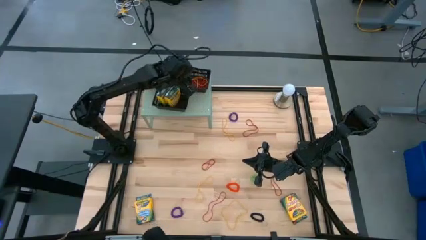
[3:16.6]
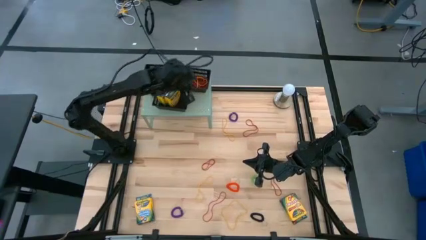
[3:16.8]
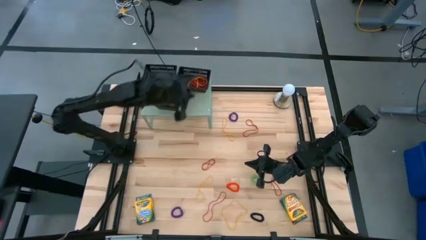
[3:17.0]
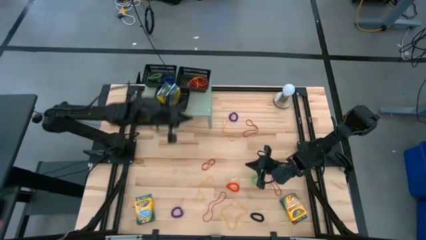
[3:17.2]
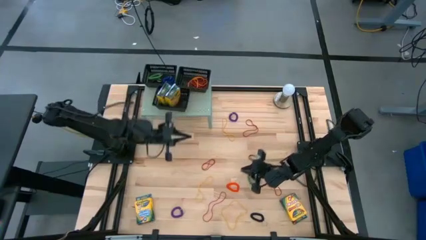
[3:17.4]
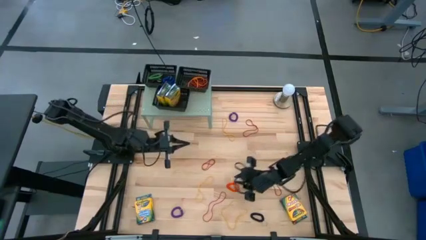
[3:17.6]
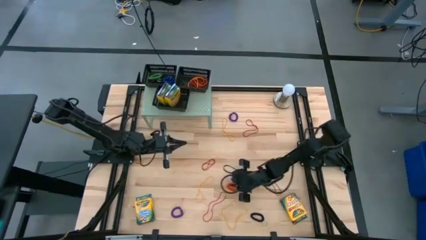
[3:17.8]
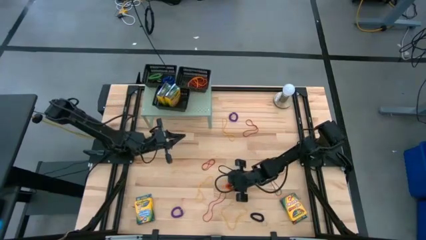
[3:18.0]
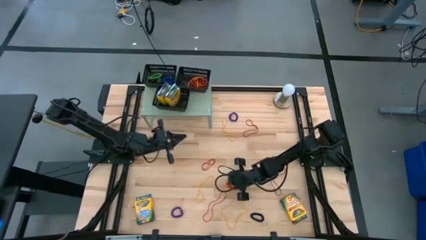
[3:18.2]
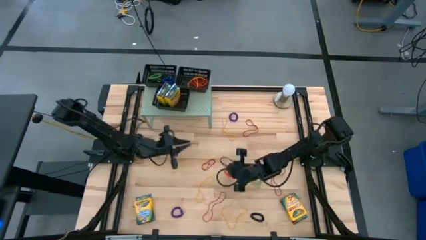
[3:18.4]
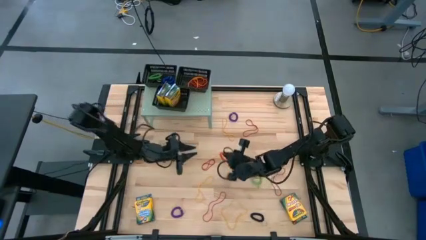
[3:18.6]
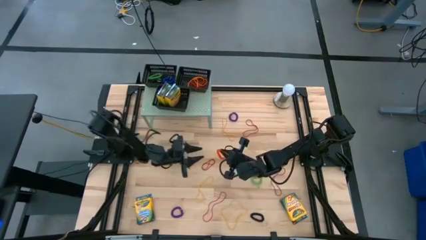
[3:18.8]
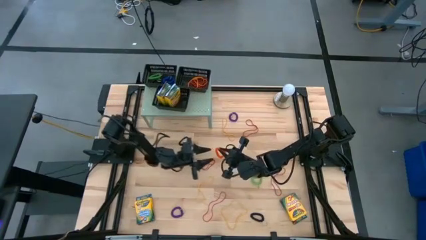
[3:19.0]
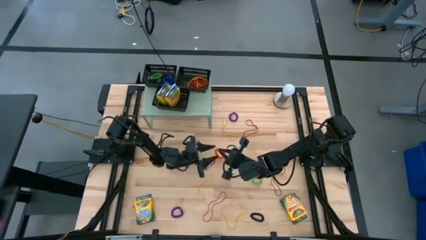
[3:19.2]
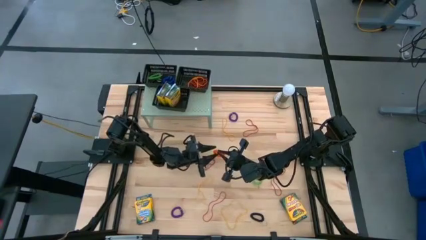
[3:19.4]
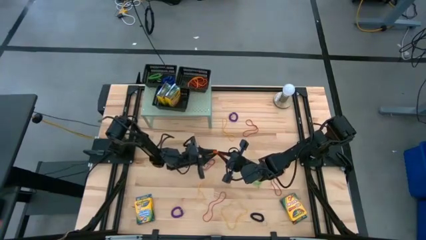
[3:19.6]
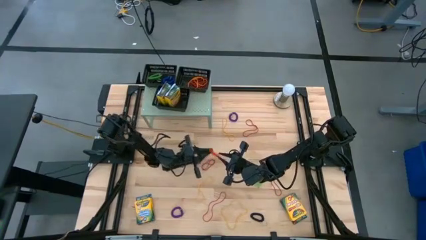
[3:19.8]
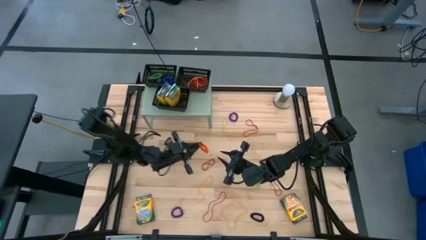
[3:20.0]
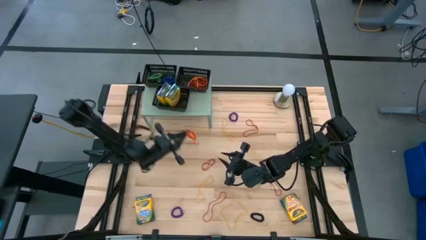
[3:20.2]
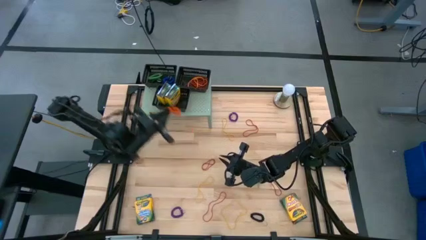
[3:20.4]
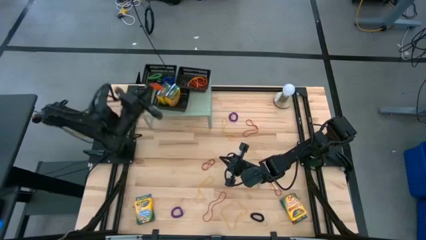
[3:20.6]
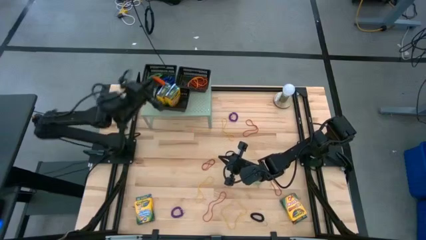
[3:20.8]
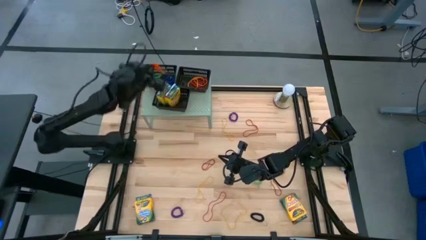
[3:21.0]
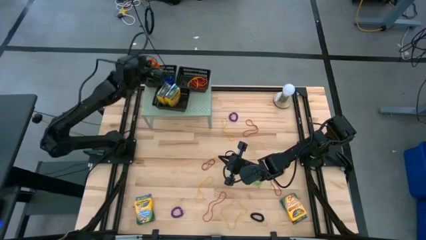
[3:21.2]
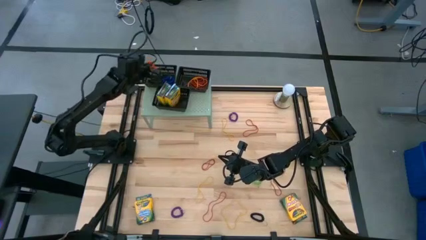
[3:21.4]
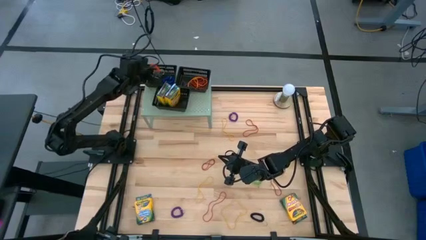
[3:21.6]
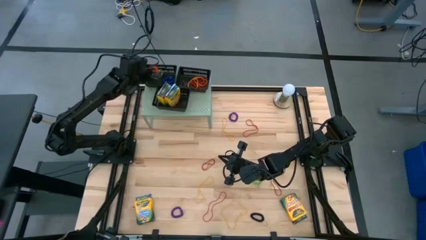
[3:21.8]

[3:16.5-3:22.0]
Task: Pick & Place Office Desk Supplies
Put the orange spring rubberband into the top left black bin

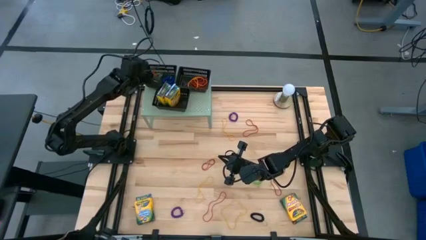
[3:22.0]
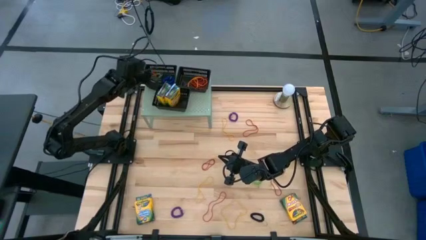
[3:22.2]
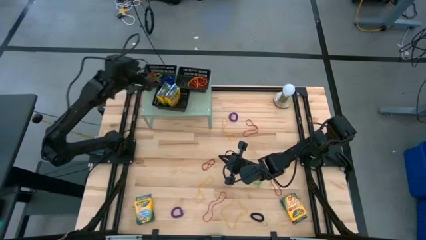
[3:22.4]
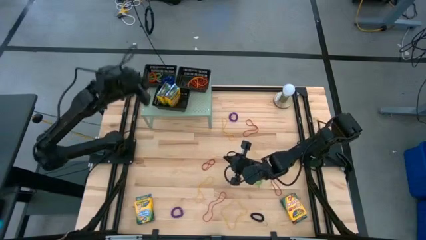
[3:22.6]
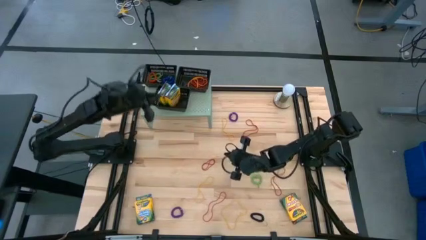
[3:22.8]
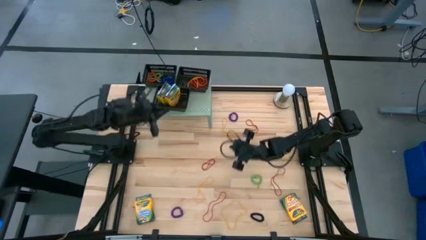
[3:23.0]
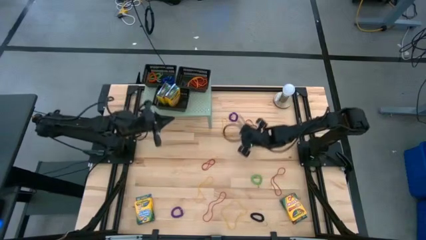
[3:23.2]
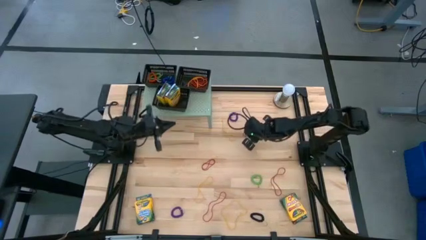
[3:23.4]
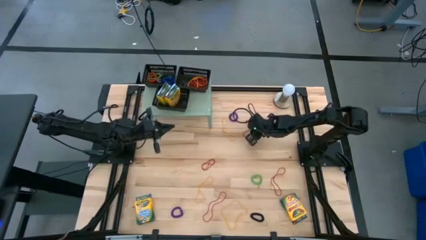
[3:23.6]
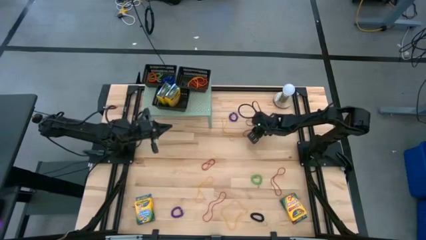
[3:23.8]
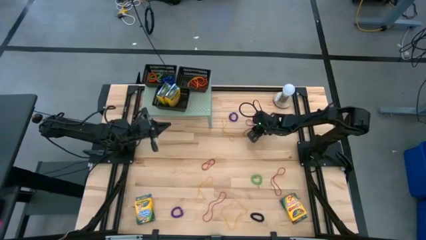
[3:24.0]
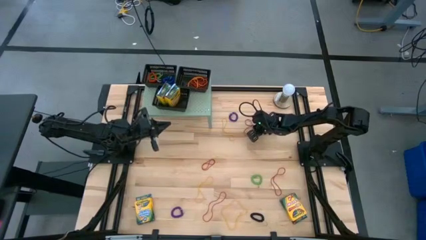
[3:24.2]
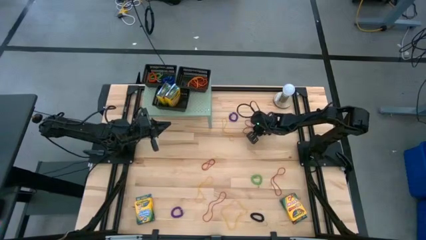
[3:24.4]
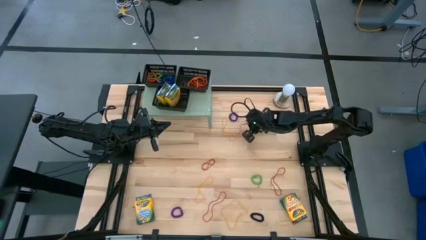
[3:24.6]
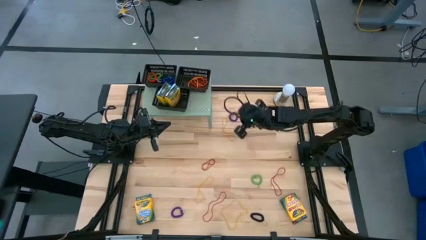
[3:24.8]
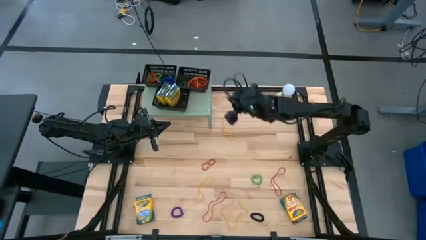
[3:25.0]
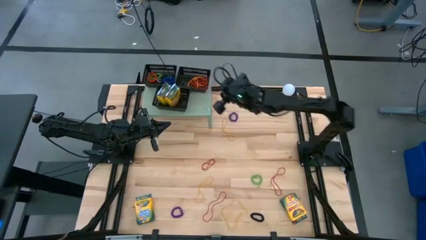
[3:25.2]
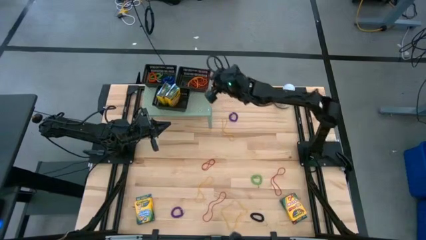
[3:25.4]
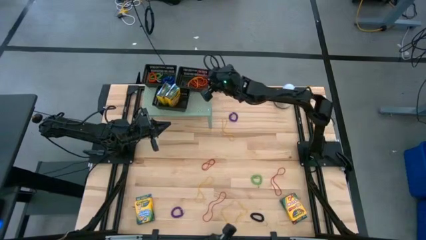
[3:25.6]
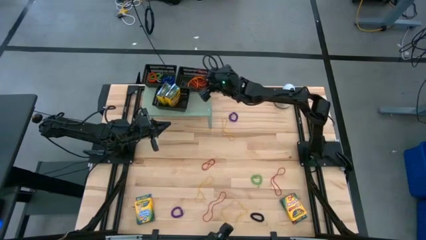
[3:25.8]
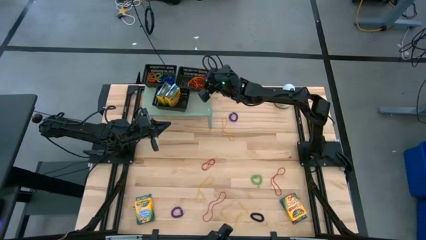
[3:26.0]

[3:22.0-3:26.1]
Put the red rubber band into the top right black bin

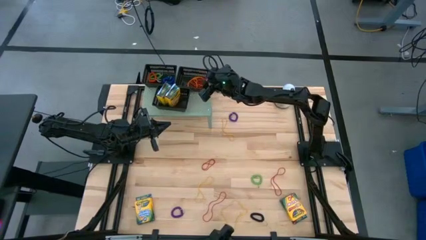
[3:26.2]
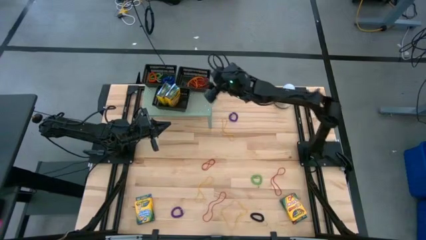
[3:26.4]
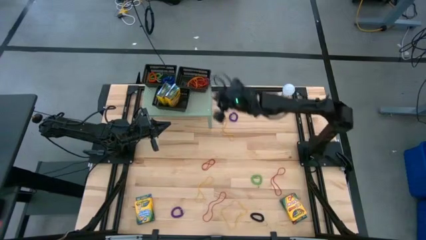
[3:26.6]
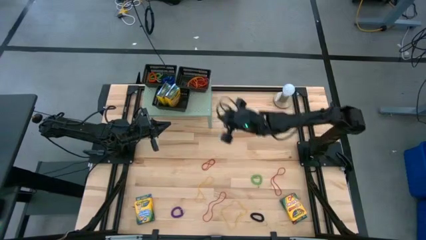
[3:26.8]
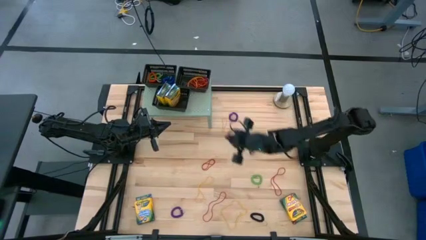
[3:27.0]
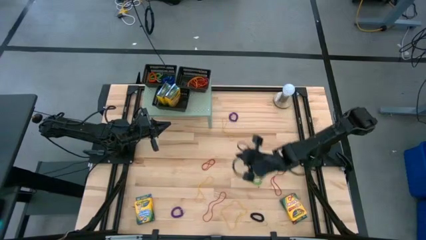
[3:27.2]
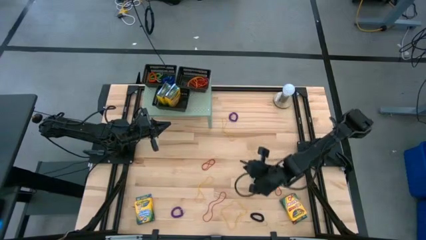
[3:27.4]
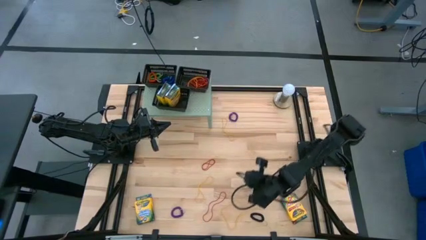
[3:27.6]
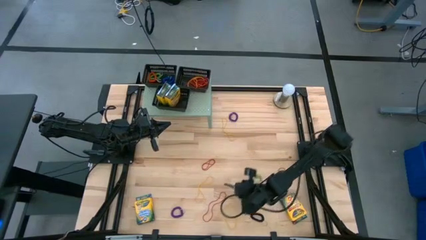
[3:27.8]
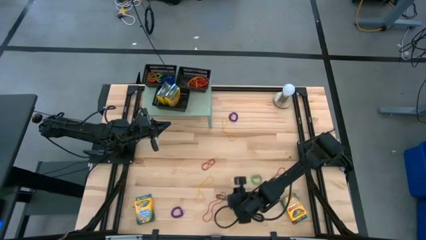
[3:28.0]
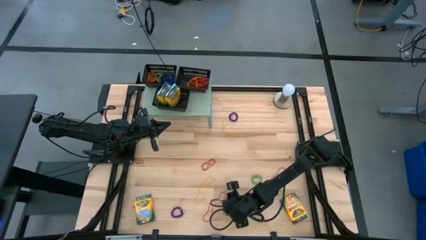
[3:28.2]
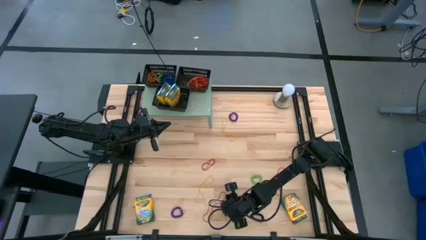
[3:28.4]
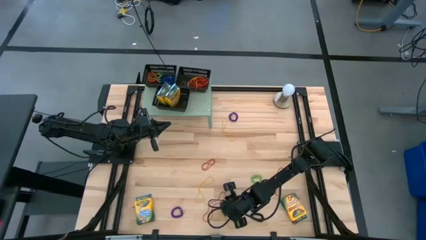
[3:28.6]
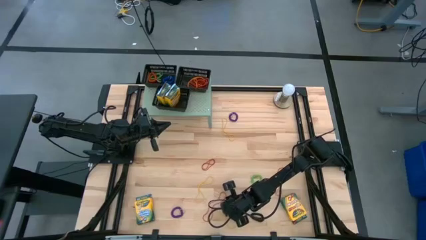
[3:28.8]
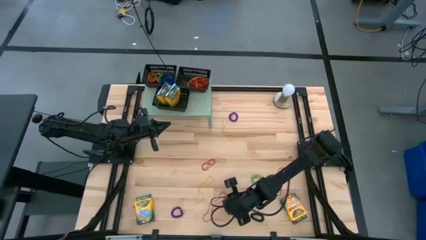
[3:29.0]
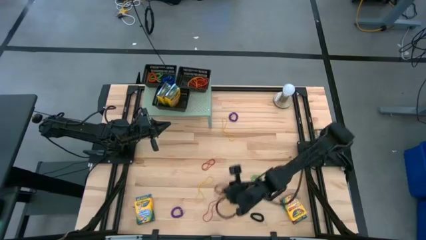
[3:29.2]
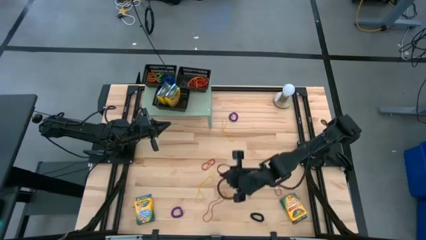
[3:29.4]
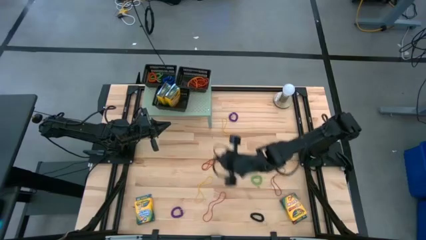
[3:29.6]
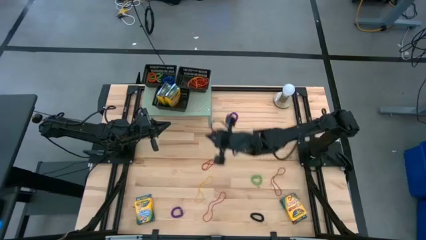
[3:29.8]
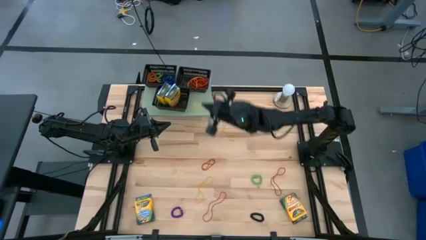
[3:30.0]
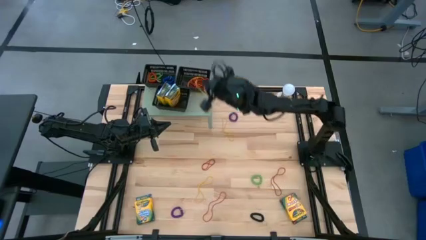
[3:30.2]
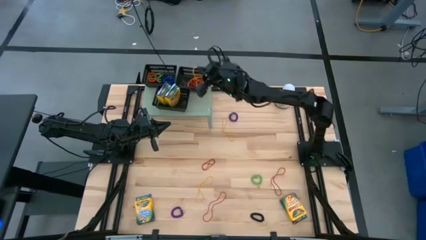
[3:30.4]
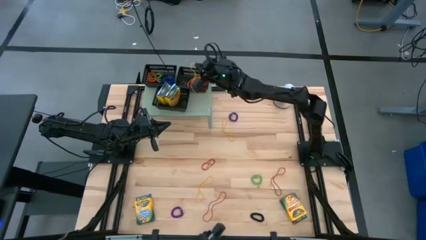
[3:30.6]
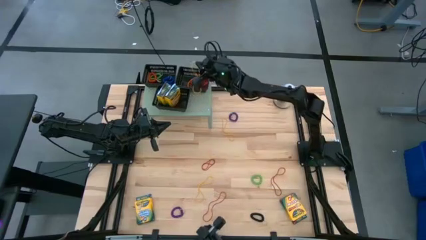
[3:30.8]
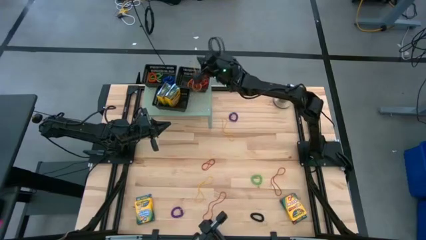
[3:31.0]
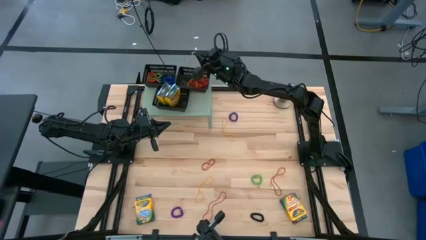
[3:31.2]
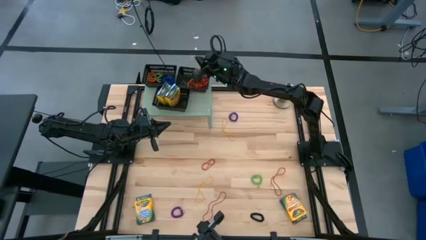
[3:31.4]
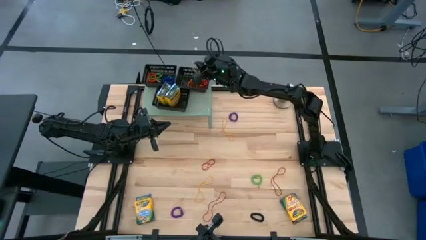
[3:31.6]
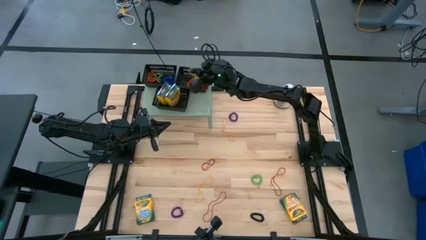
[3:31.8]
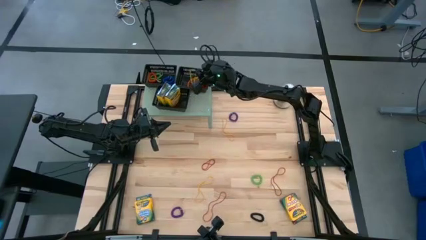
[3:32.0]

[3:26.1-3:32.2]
Put the yellow rubber band into the top right black bin

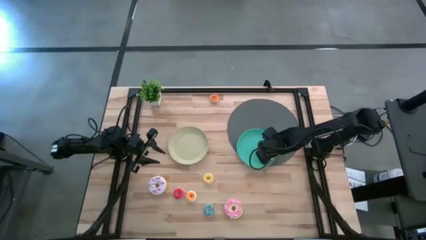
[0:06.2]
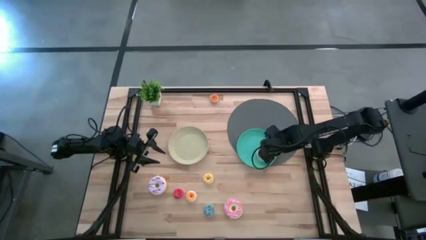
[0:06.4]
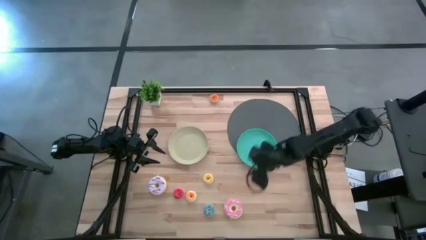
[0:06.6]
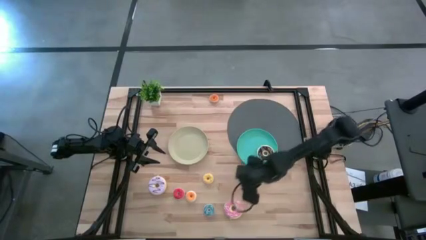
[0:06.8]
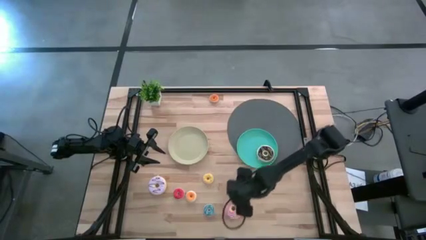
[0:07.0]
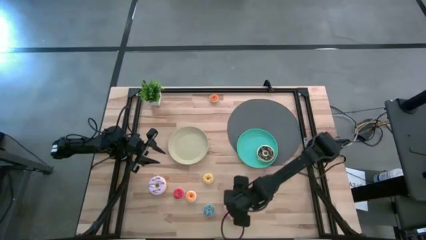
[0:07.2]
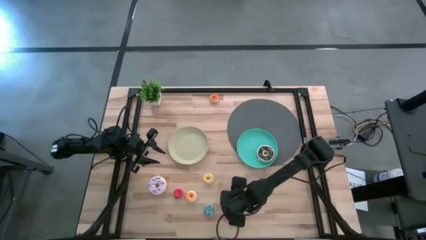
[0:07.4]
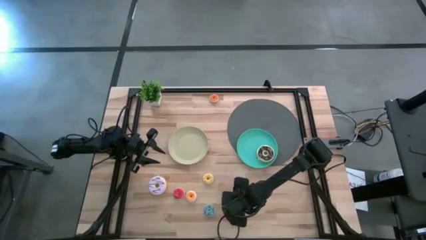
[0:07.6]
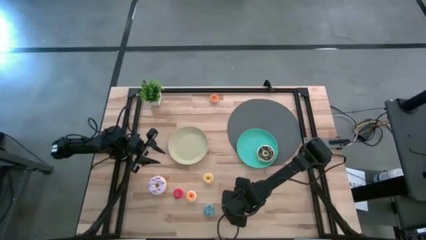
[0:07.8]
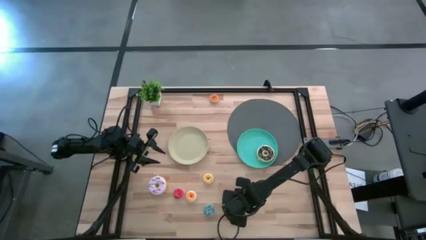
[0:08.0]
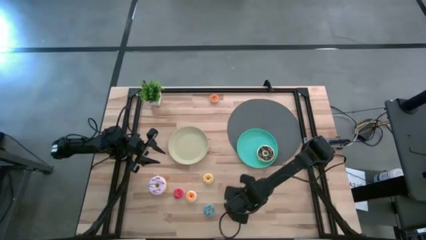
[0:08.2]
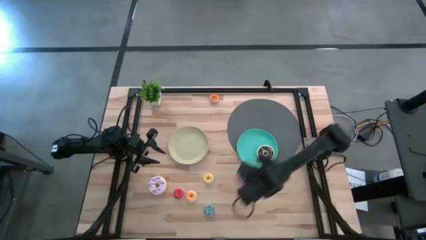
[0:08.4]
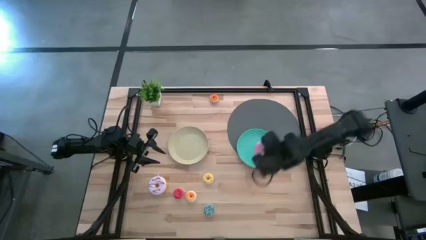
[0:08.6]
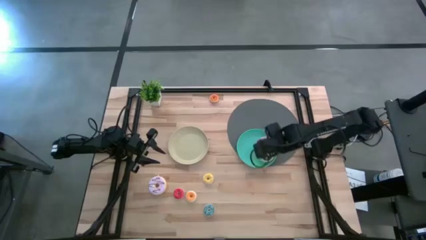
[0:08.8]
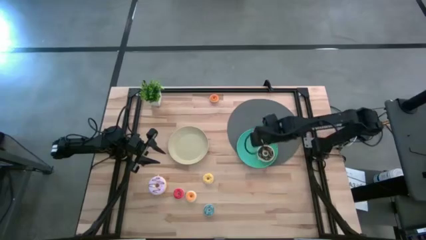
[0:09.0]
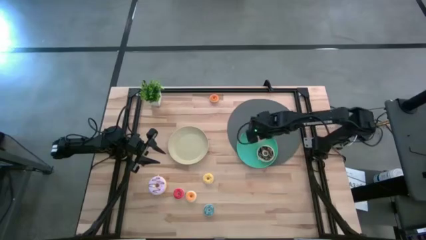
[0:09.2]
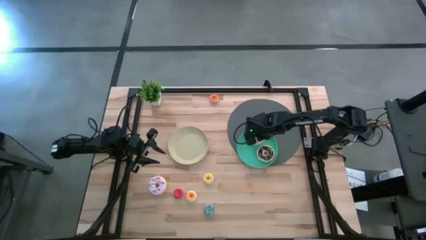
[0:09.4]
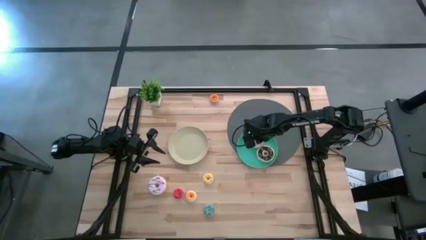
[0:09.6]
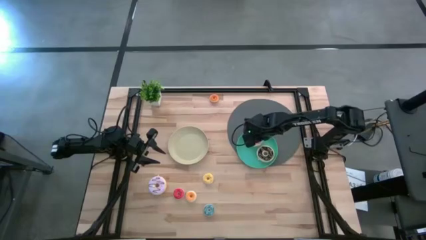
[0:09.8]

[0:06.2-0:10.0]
Task: Pick & Place donuts
Put the large pink donut on the blue plate
